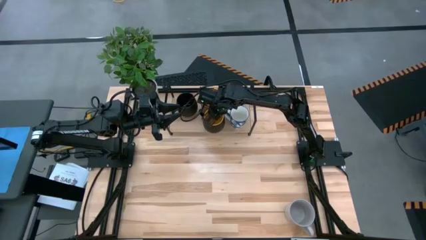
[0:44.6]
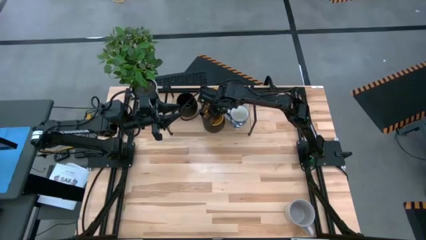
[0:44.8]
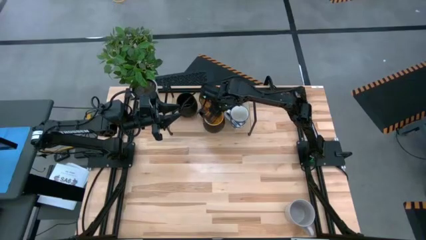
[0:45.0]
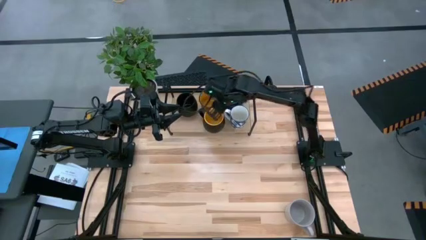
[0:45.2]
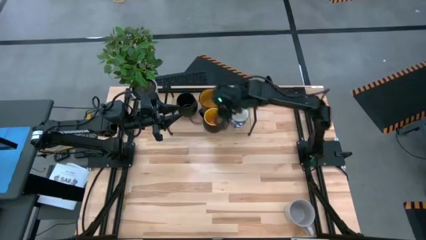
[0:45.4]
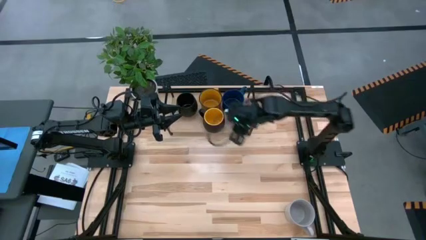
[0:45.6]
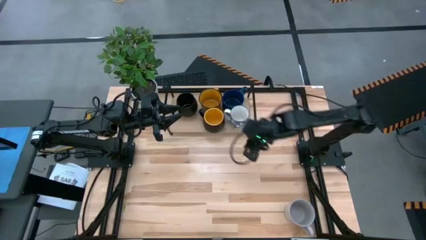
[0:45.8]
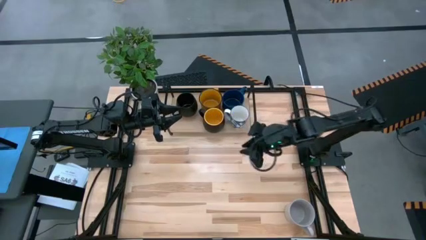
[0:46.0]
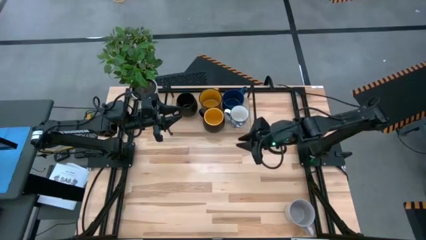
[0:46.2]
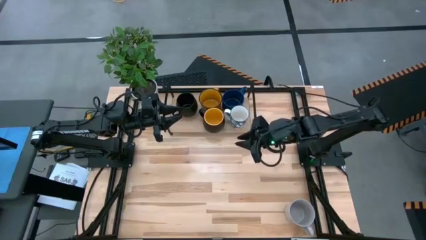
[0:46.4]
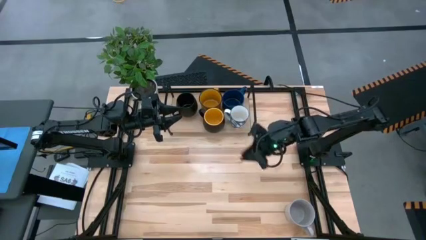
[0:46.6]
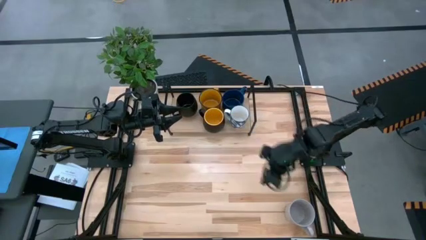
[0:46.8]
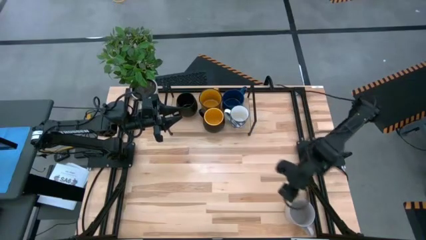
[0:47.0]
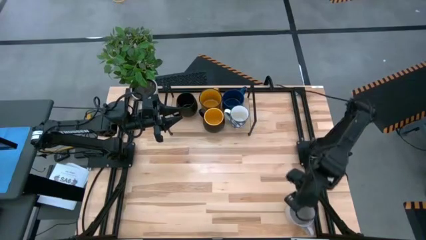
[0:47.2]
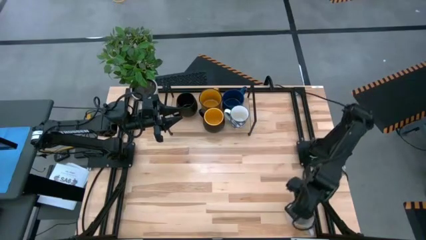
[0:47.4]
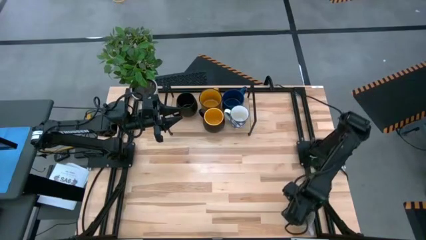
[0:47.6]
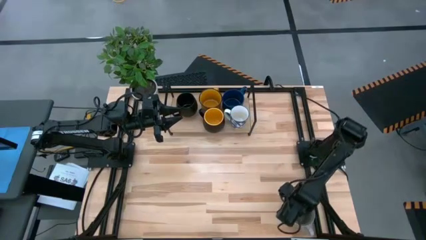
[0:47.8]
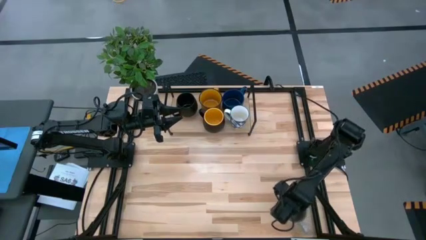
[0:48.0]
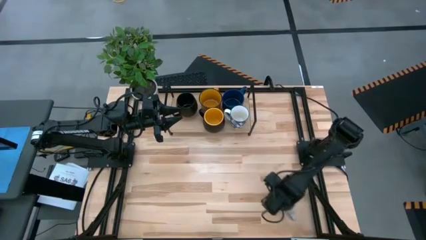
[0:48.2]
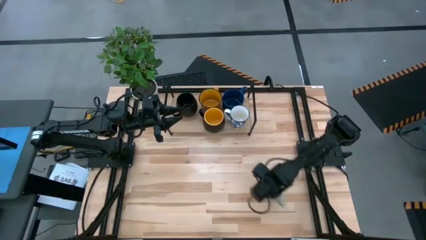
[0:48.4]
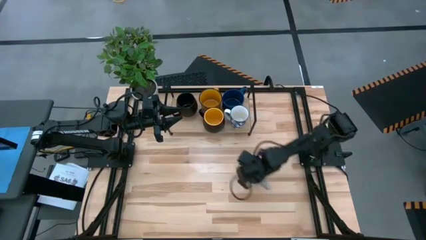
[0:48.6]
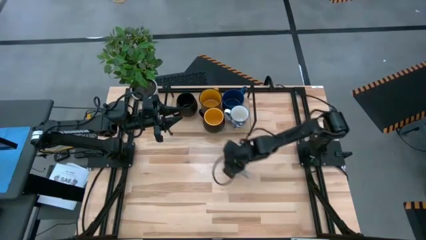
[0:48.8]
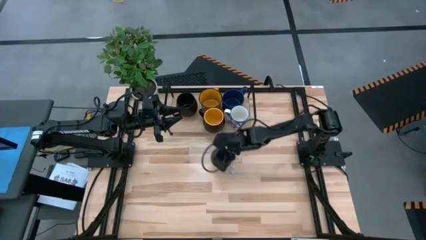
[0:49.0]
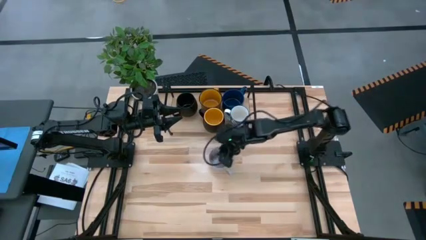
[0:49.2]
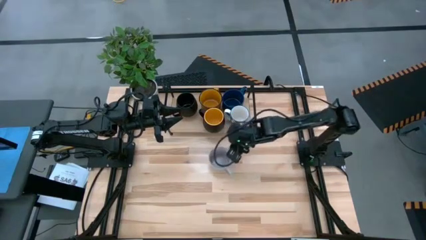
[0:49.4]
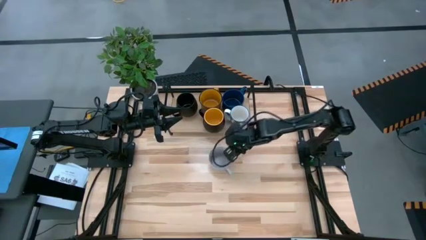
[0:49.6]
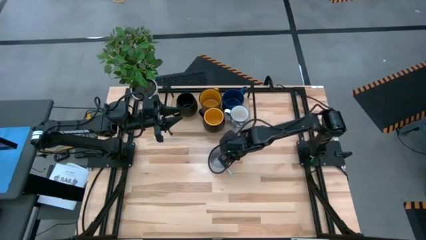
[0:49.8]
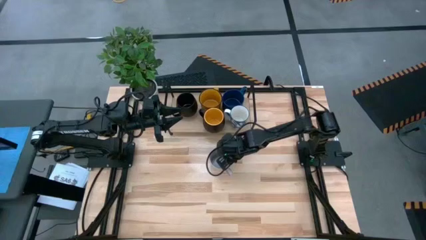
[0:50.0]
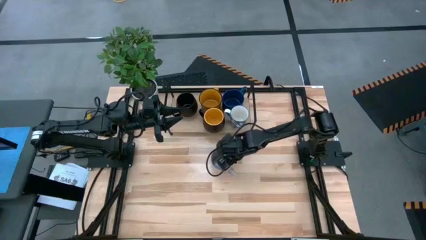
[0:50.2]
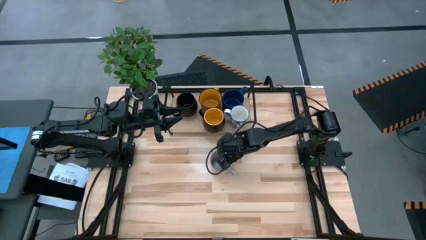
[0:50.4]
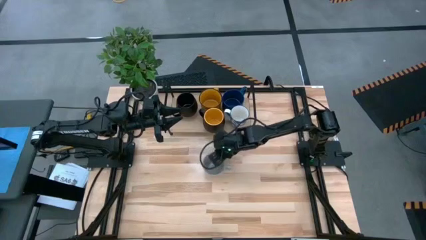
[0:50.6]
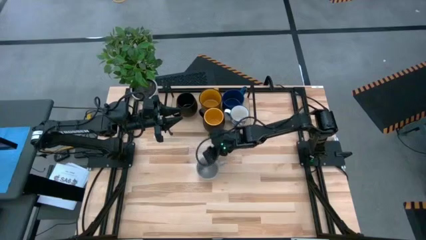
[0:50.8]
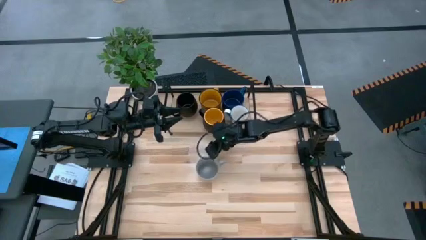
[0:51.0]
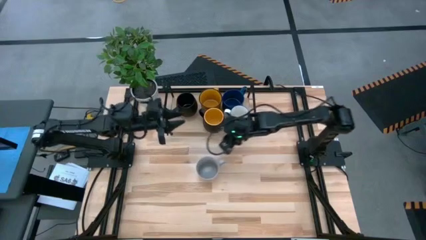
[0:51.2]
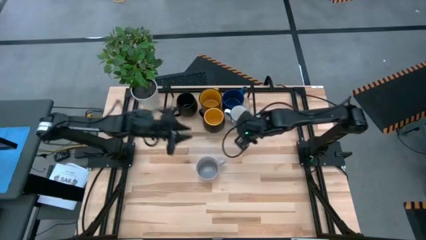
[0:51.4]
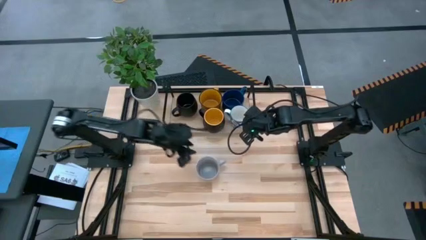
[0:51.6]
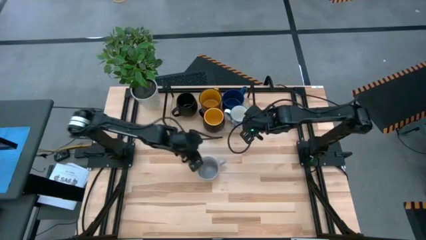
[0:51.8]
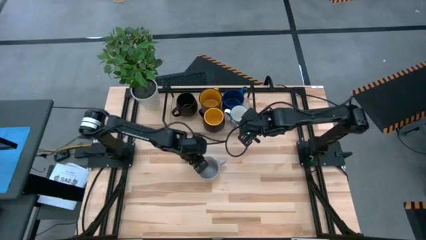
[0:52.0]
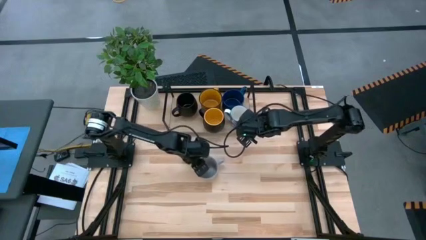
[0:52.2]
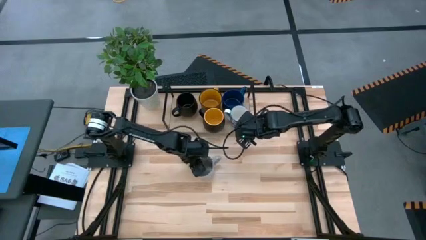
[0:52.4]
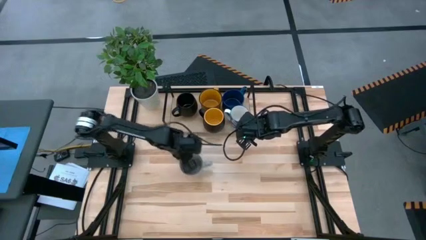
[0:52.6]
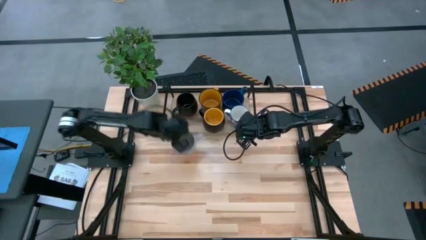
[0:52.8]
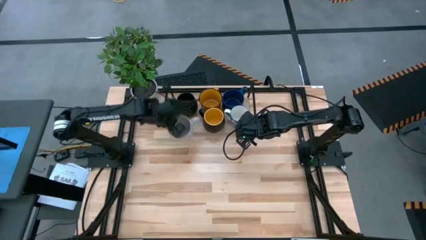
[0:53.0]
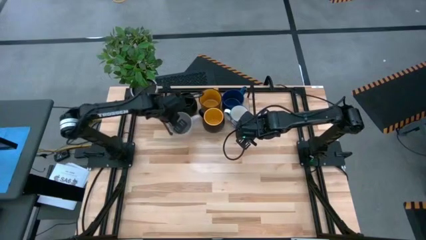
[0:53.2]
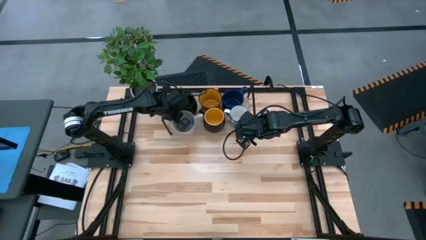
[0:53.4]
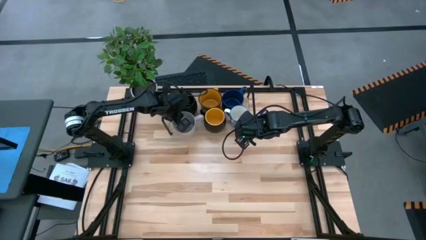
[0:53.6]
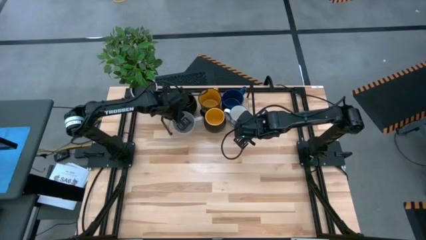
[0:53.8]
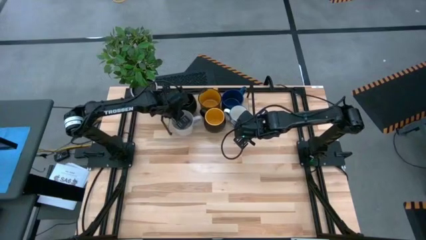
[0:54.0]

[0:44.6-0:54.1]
Task: Place coffee mugs
Put the white mug on the shelf

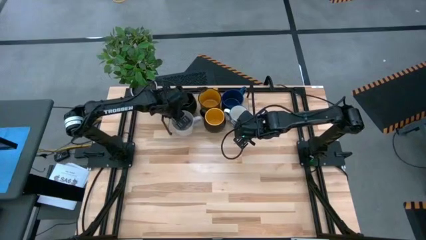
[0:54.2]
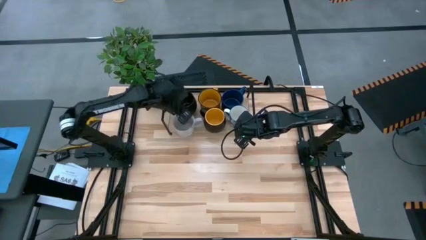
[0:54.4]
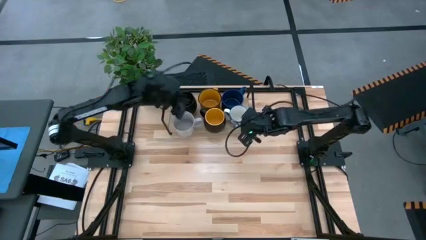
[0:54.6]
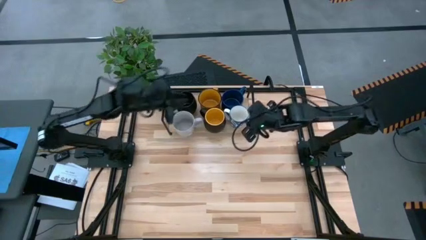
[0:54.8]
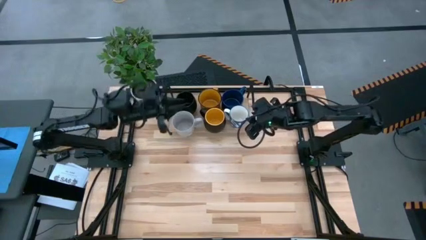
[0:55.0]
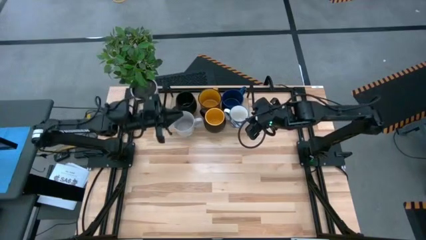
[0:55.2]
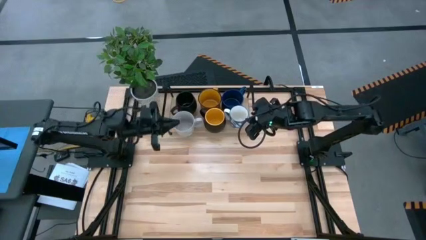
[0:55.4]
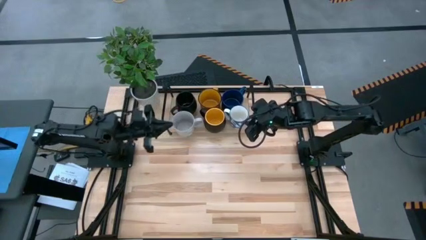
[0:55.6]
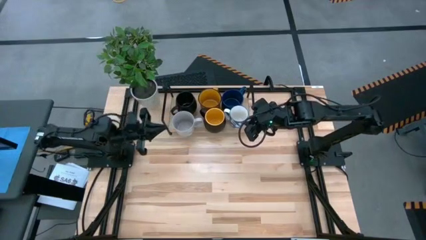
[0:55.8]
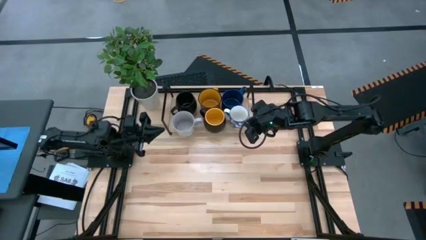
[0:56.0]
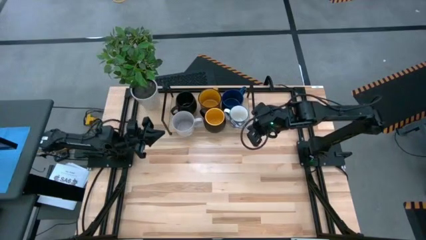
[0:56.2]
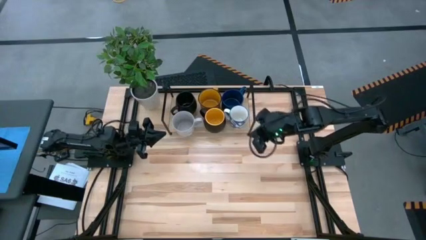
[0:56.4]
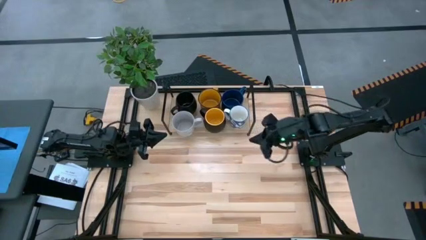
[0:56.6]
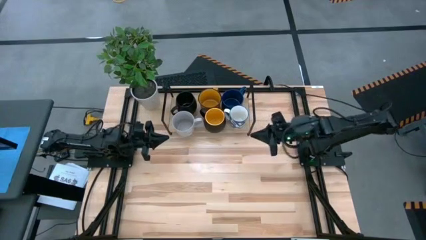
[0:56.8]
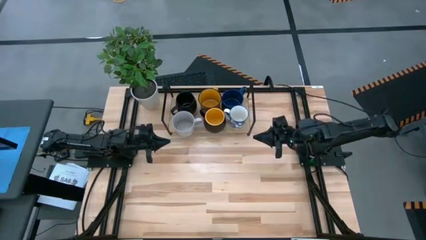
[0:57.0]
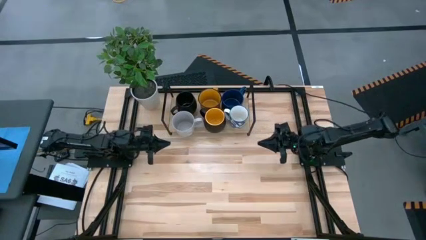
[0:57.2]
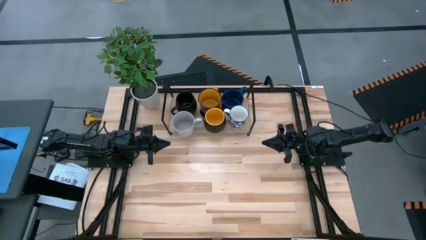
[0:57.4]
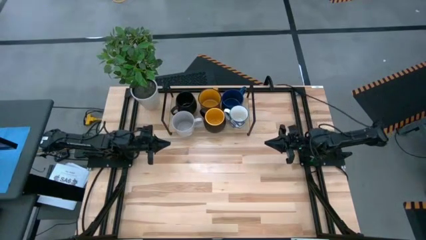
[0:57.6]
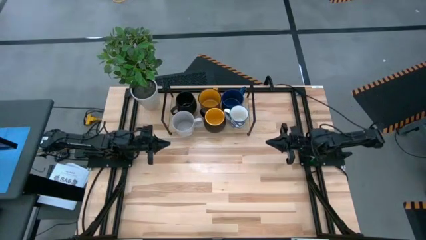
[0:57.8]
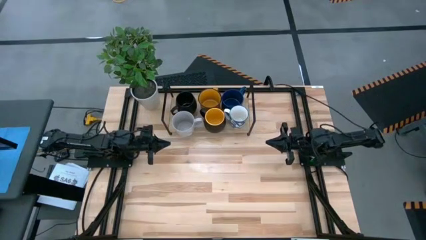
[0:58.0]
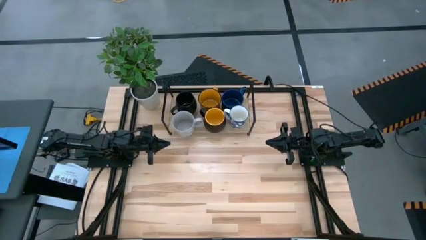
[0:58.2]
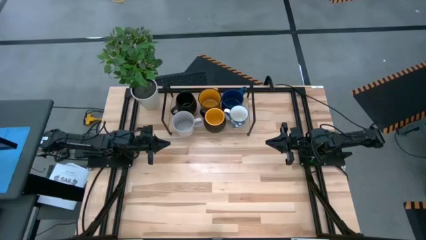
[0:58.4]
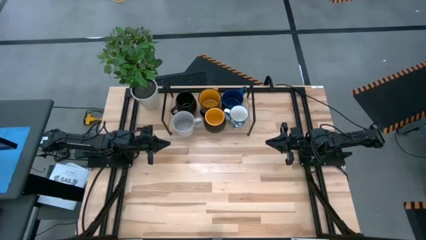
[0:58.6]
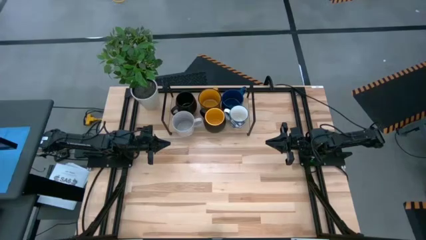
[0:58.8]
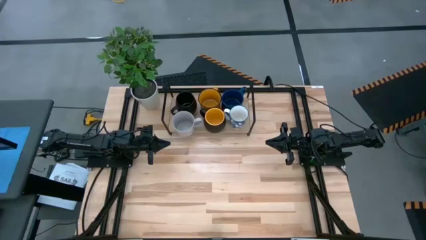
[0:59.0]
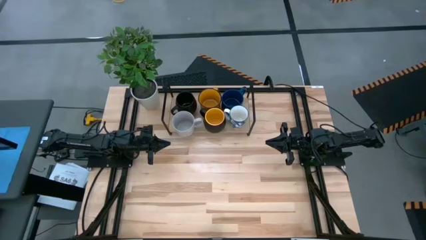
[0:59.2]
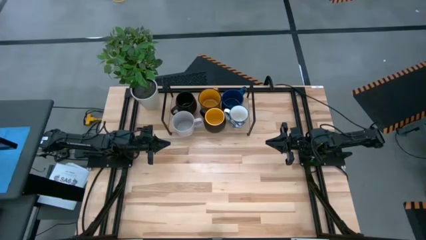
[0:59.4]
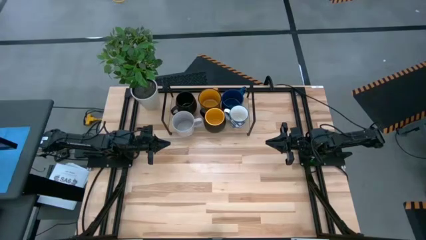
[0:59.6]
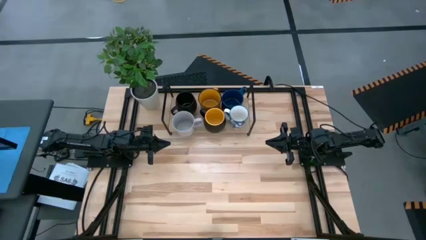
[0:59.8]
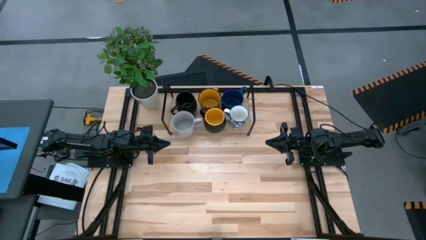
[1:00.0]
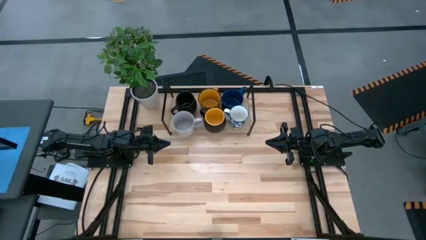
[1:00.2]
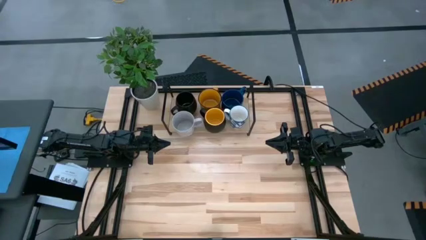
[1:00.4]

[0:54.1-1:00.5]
Return to Home Position
